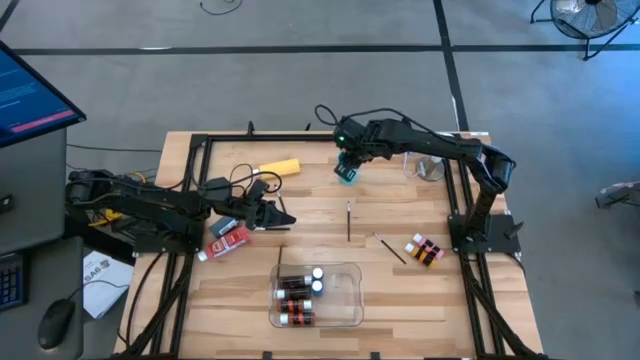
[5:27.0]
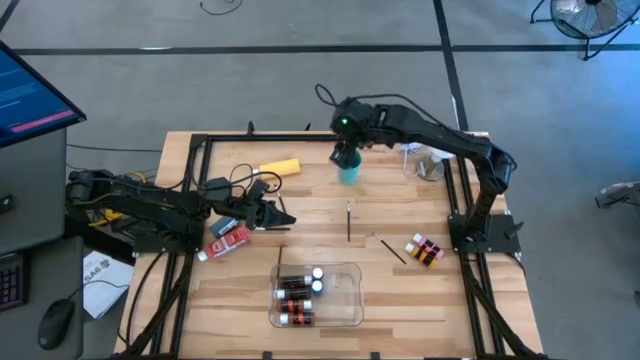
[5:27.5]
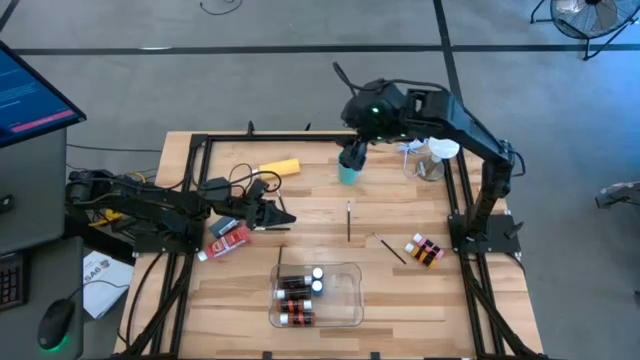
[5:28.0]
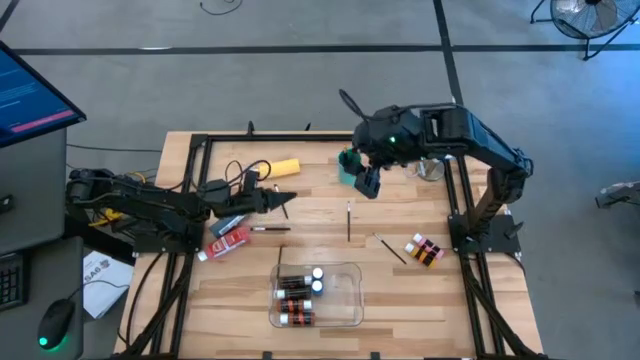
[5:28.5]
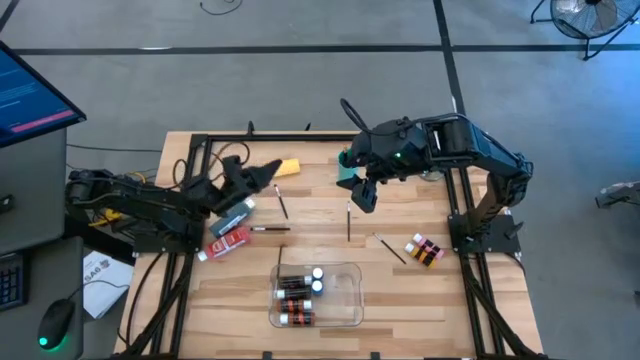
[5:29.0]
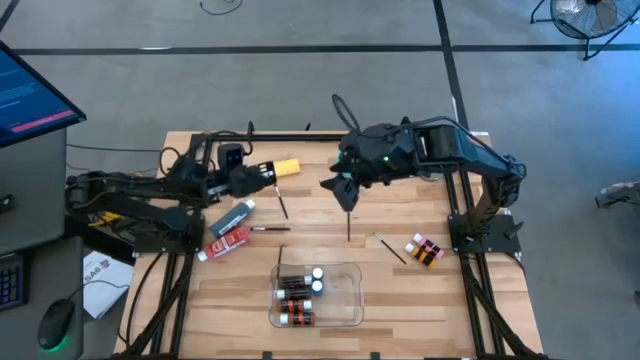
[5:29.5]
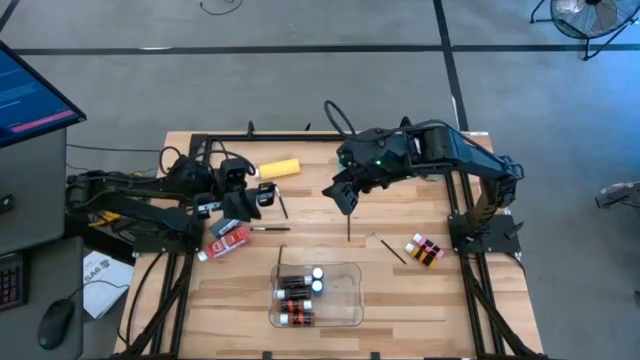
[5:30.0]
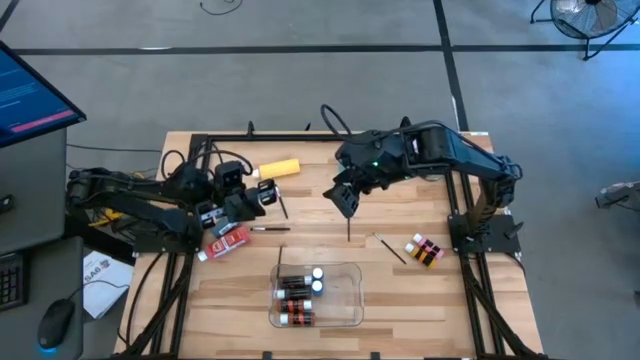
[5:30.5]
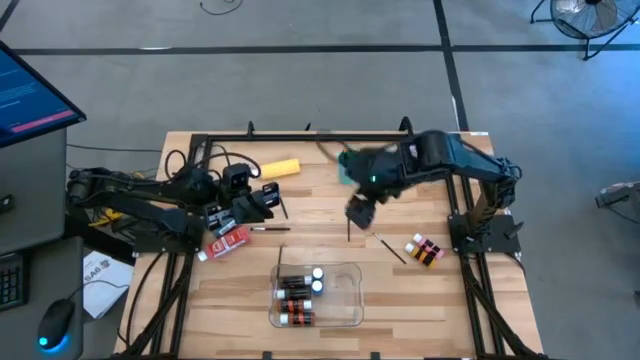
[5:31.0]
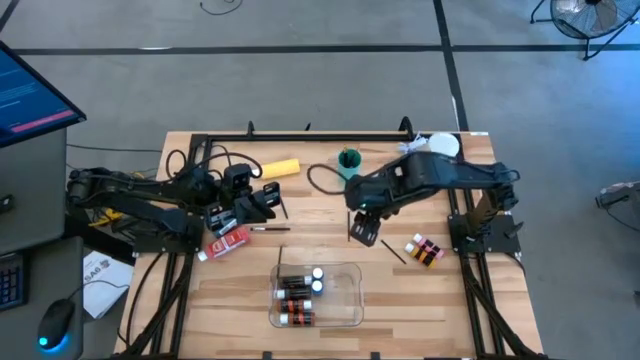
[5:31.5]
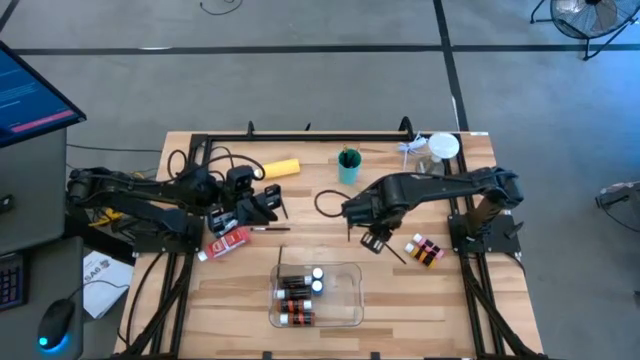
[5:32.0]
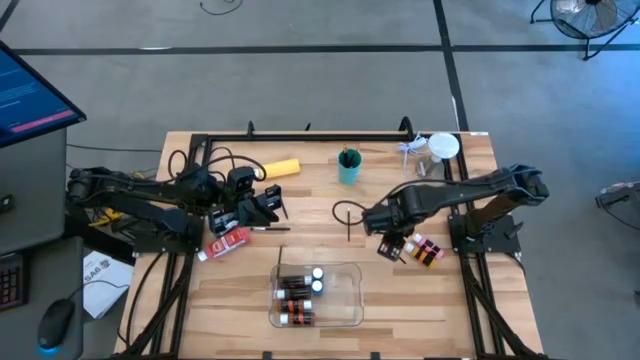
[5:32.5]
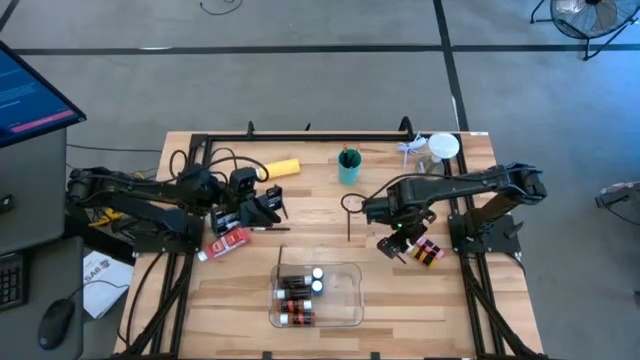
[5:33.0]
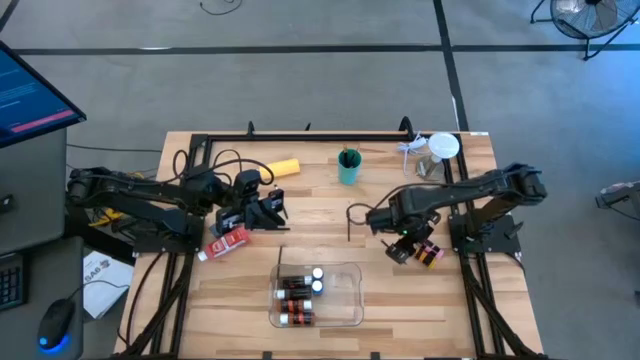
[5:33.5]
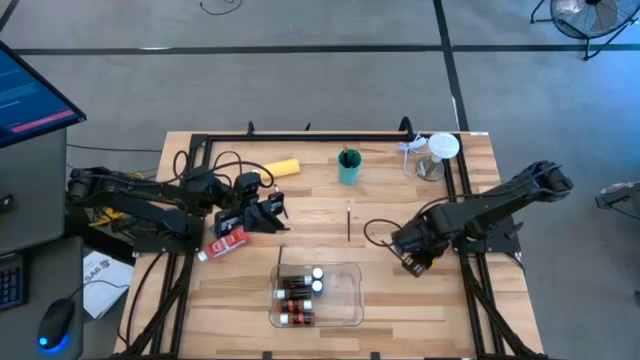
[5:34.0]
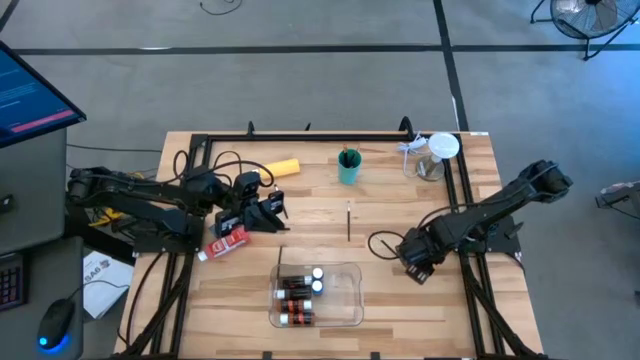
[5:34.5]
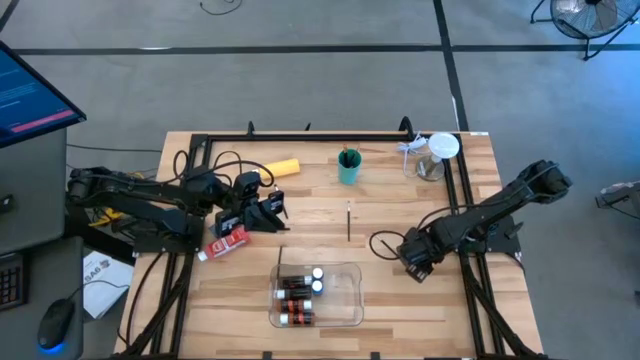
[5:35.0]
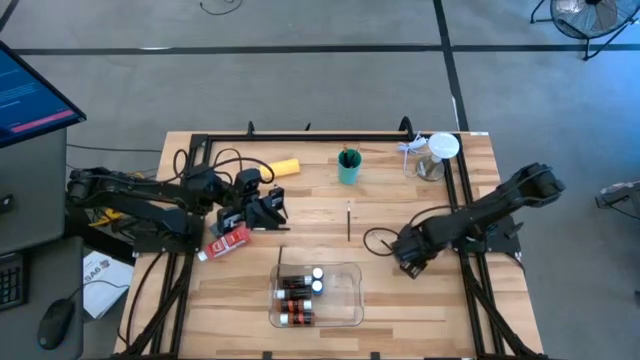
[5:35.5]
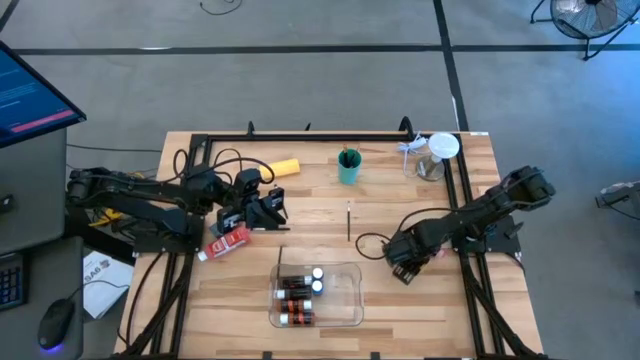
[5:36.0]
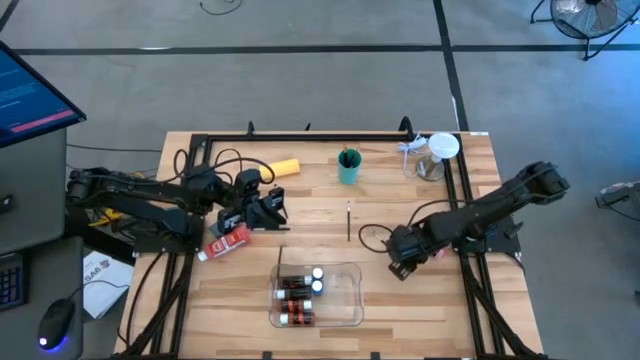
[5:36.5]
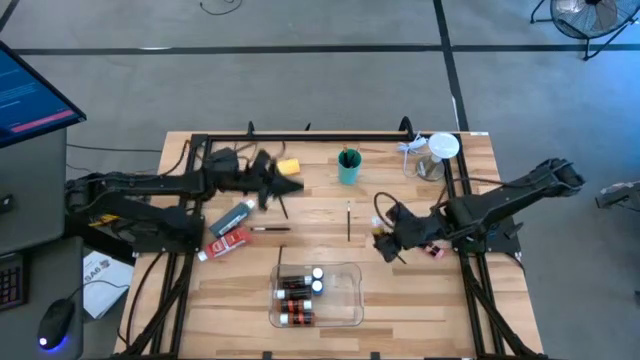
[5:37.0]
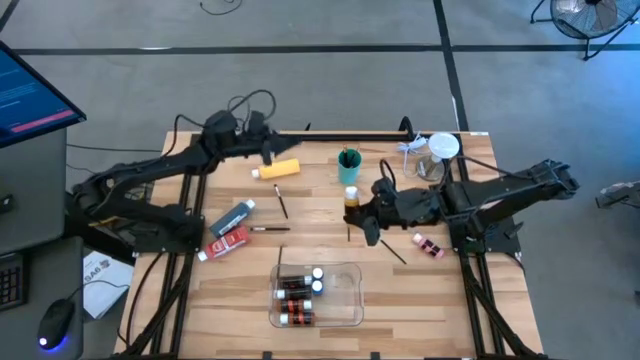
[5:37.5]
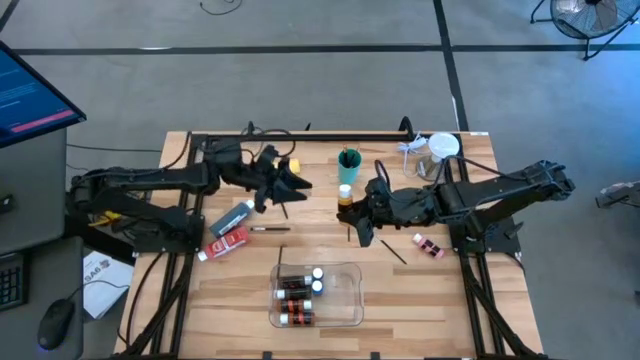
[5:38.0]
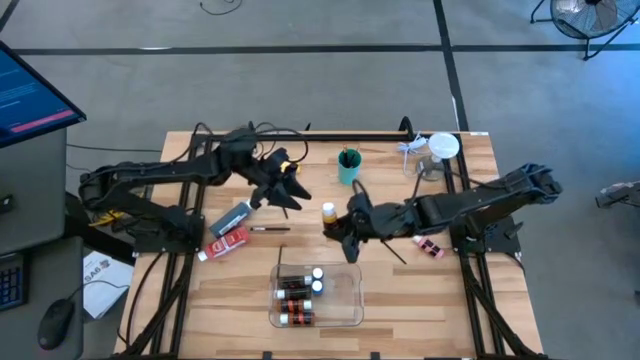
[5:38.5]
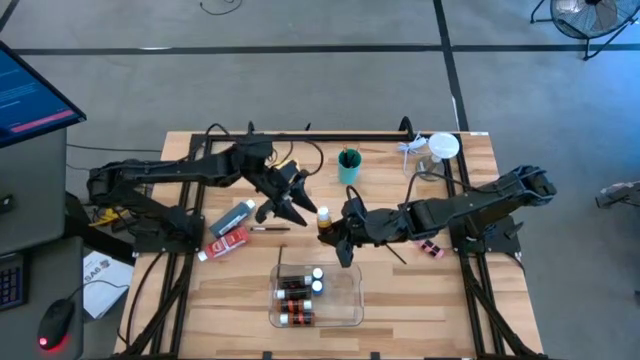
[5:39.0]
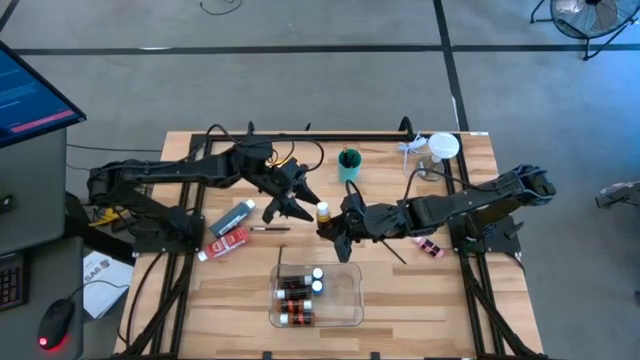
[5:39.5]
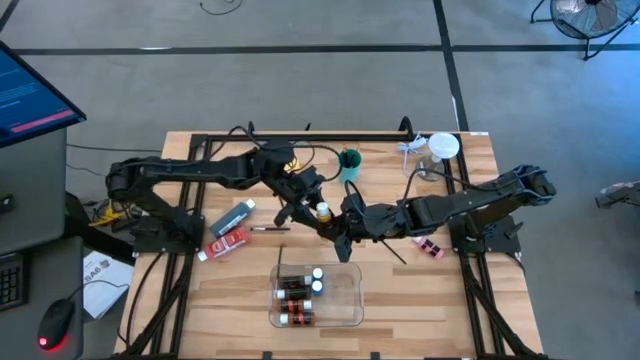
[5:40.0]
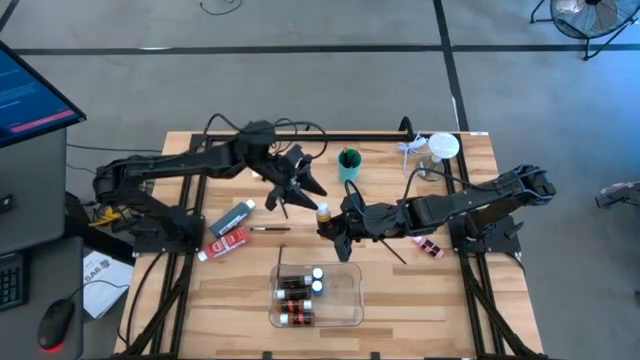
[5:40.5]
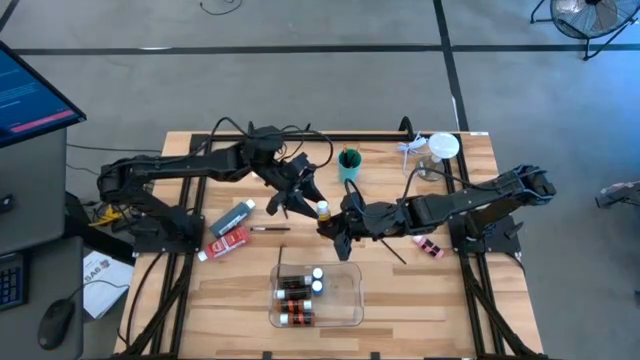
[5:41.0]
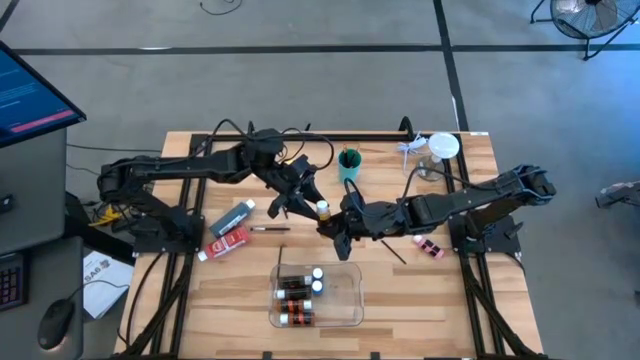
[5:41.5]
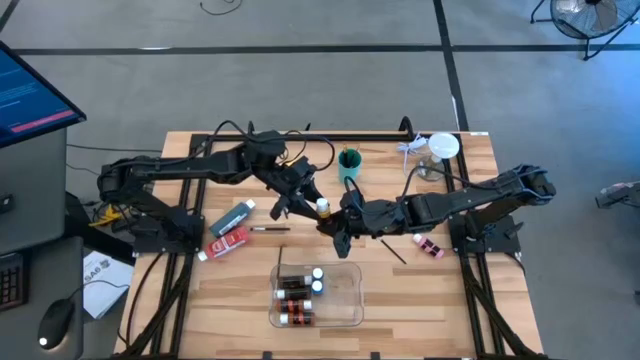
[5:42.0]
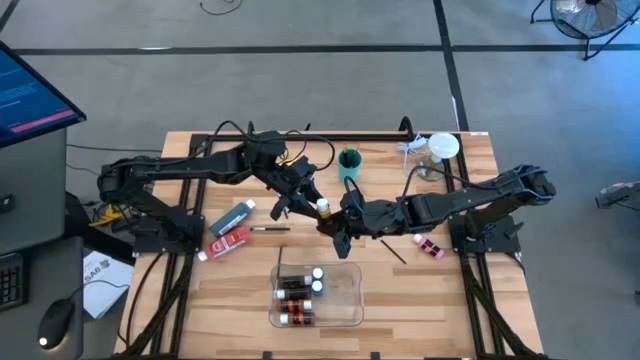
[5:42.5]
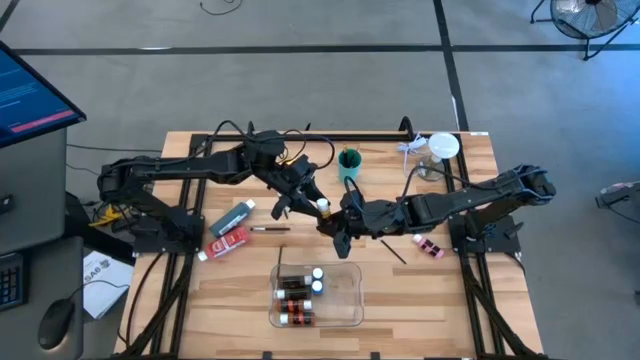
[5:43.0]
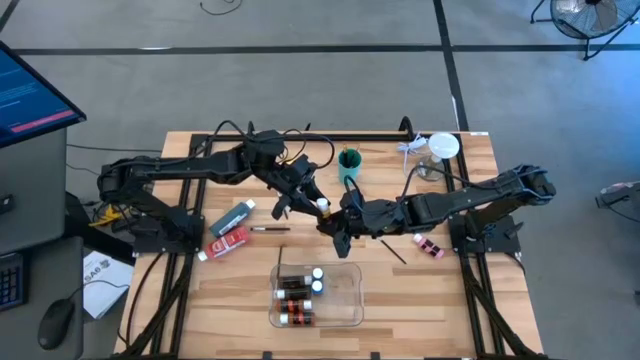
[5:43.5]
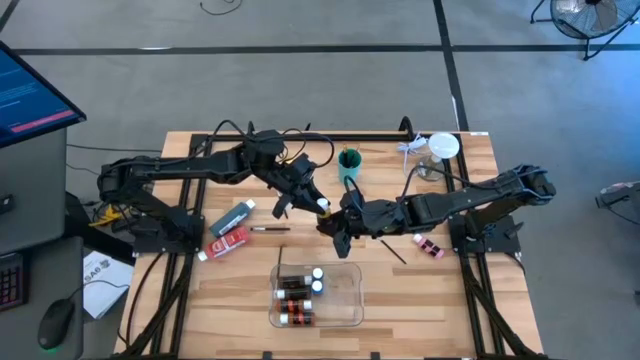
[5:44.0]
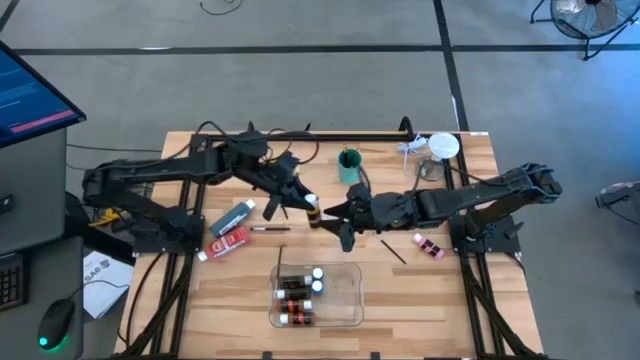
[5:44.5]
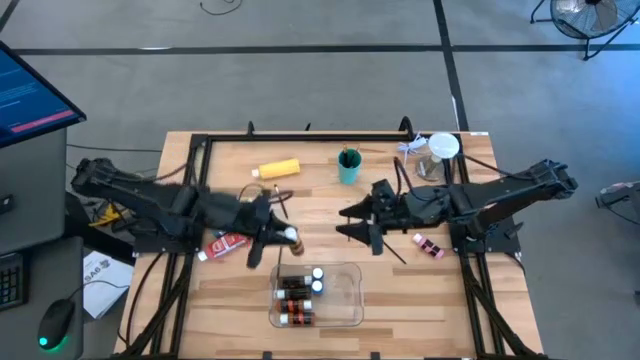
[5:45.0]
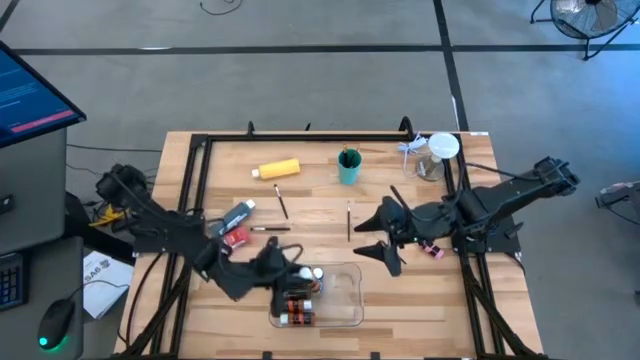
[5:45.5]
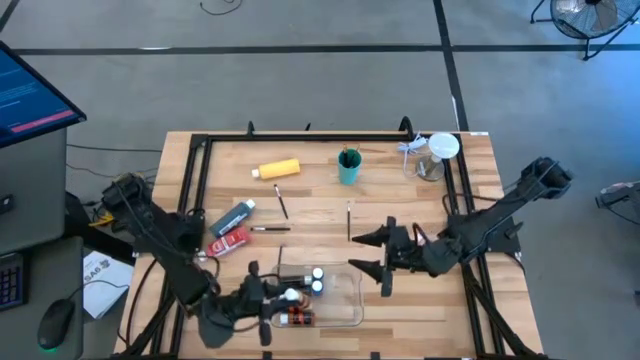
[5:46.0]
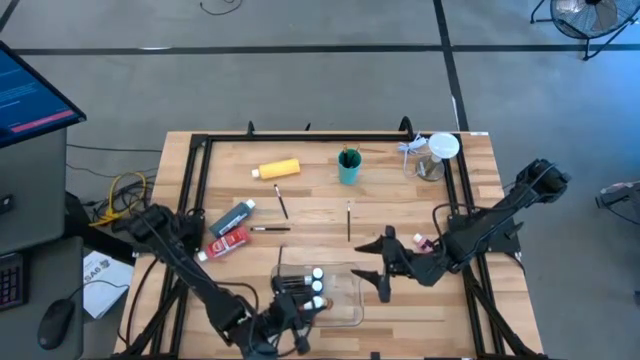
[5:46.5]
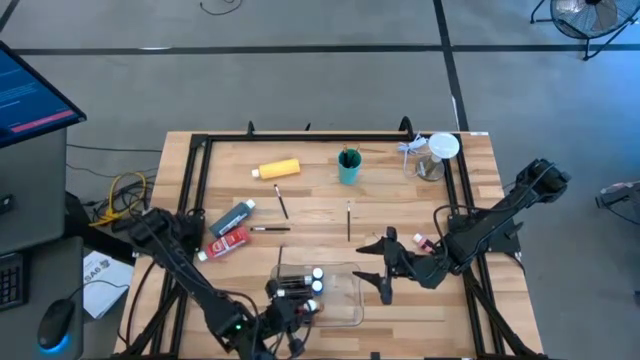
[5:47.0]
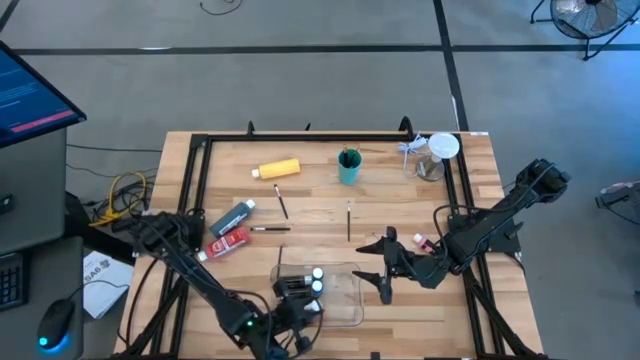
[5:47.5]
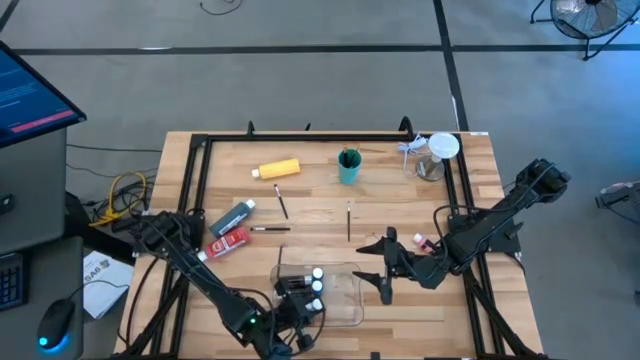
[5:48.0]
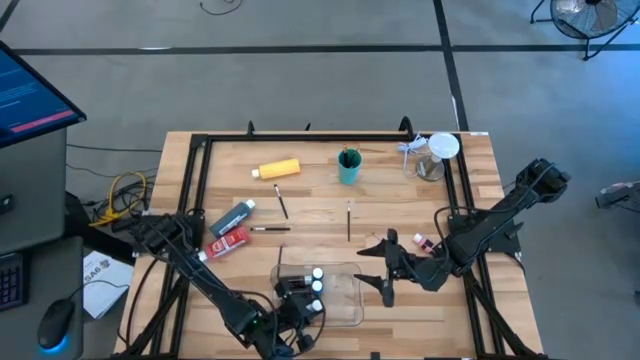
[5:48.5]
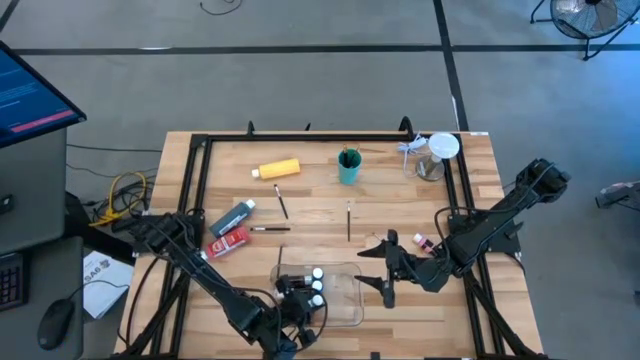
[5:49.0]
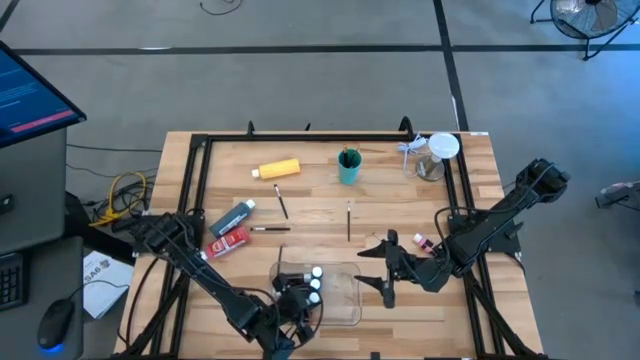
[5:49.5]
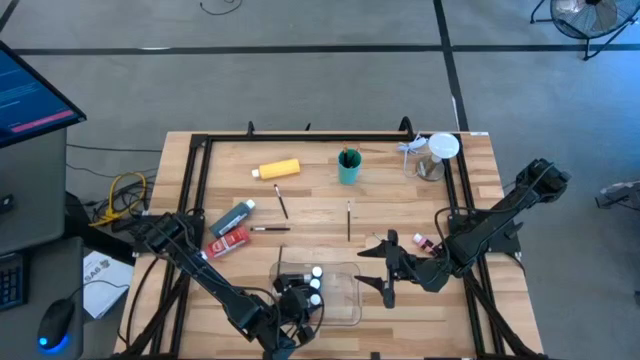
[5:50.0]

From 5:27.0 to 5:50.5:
Task: Pick & Place Paint Supplies
Put the dark yellow paint bottle into the transparent bin
